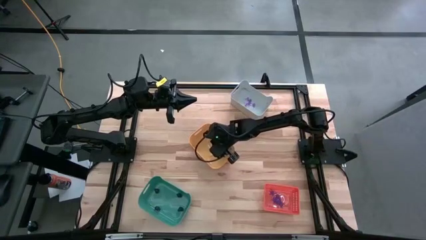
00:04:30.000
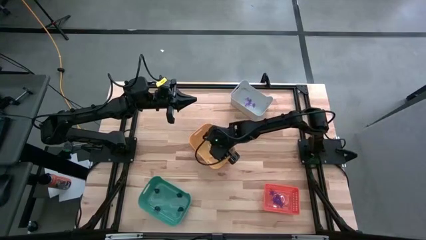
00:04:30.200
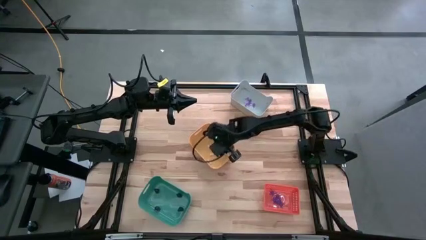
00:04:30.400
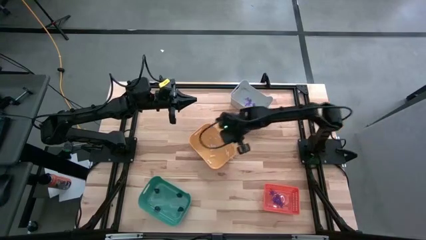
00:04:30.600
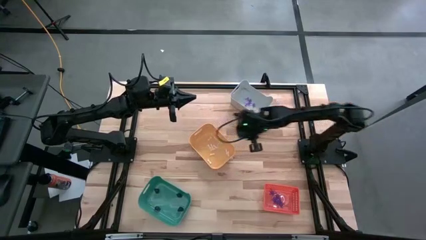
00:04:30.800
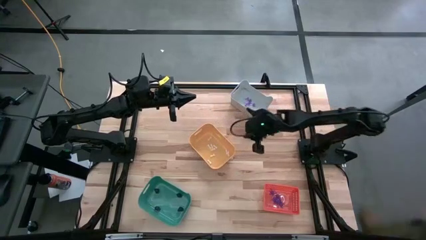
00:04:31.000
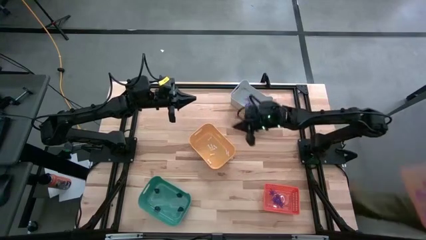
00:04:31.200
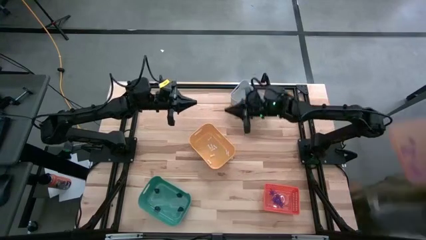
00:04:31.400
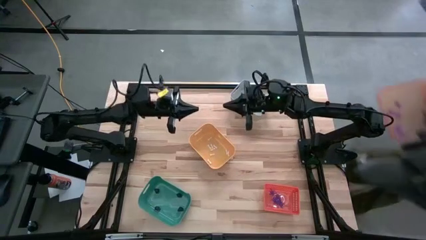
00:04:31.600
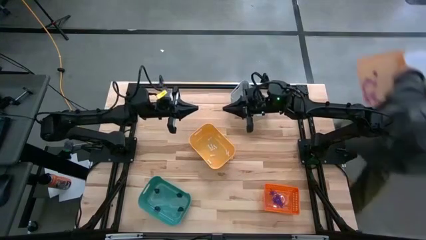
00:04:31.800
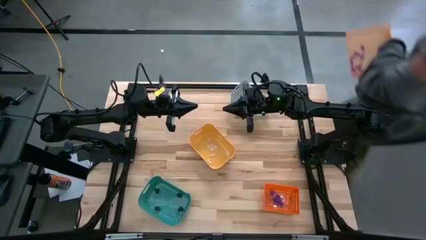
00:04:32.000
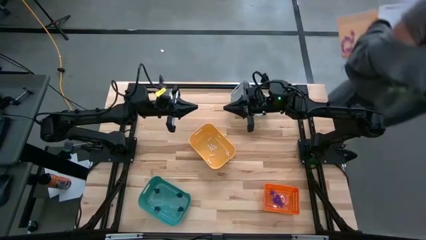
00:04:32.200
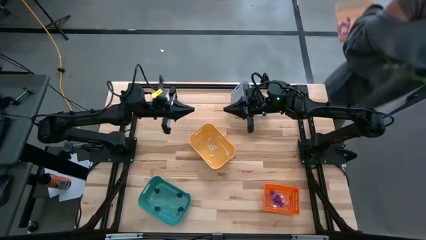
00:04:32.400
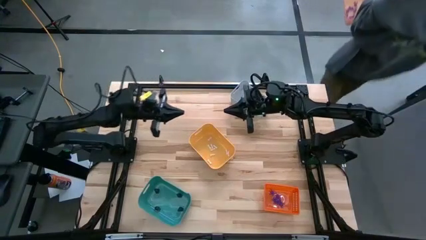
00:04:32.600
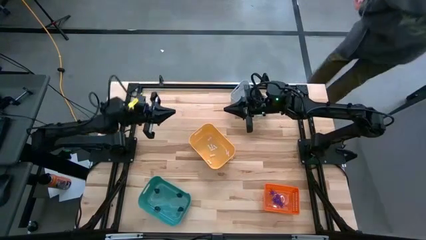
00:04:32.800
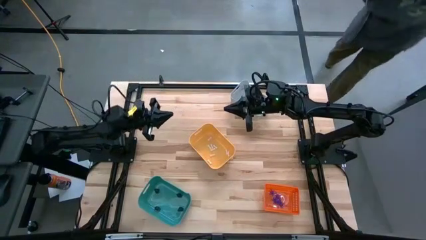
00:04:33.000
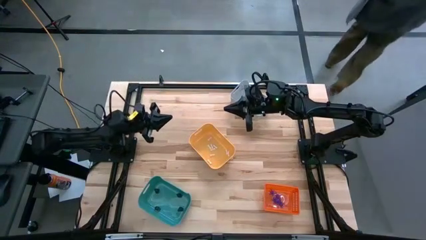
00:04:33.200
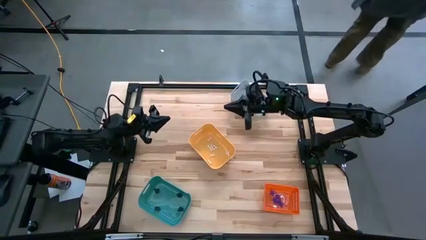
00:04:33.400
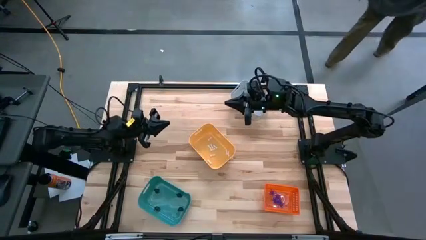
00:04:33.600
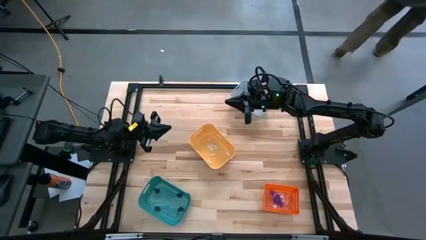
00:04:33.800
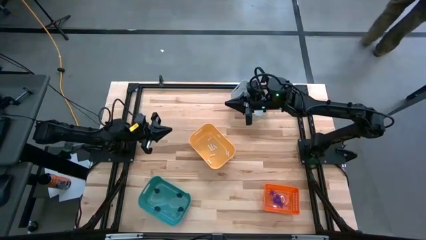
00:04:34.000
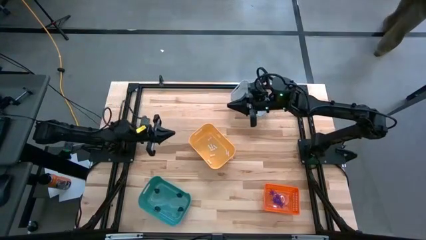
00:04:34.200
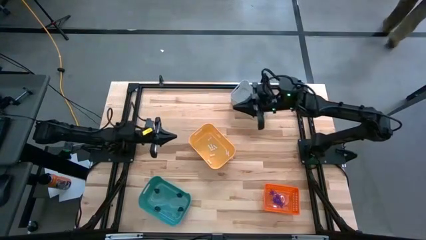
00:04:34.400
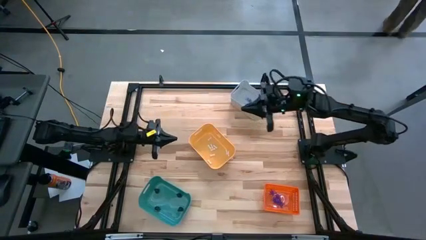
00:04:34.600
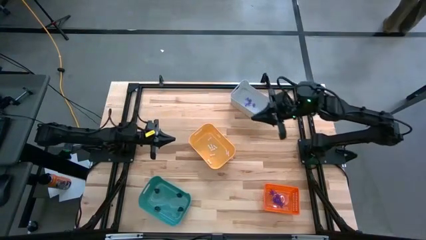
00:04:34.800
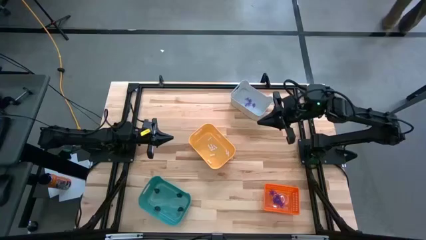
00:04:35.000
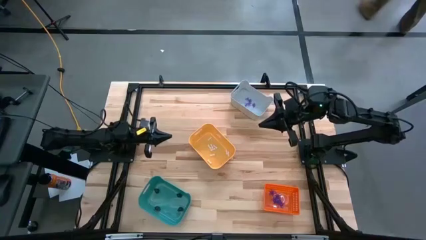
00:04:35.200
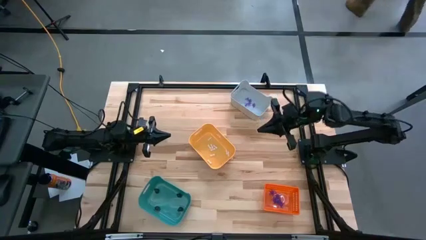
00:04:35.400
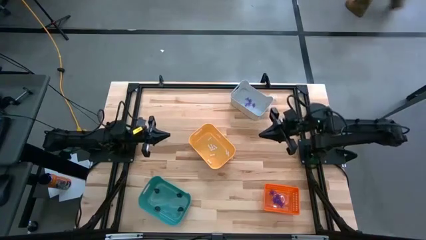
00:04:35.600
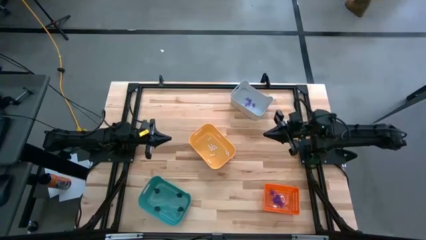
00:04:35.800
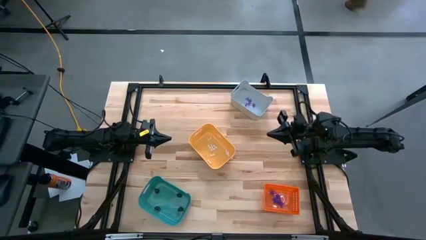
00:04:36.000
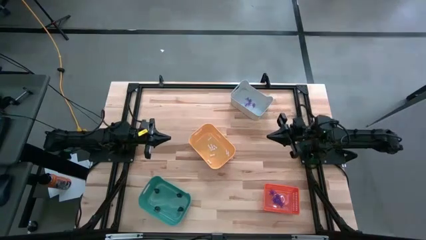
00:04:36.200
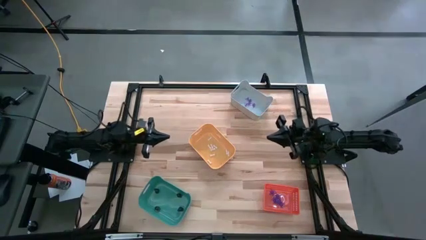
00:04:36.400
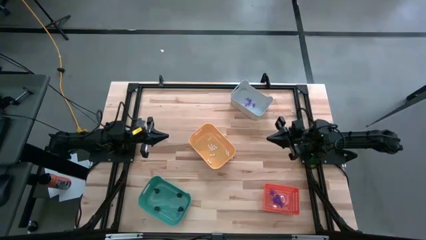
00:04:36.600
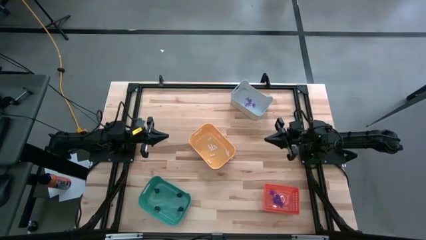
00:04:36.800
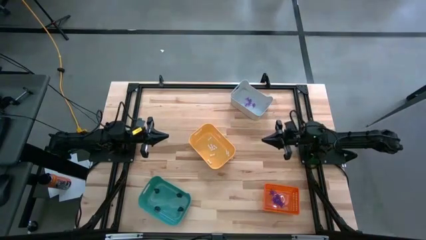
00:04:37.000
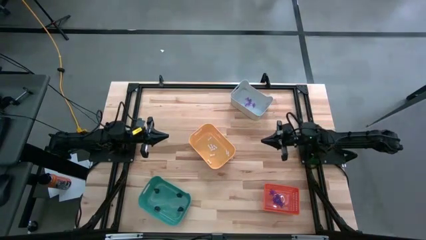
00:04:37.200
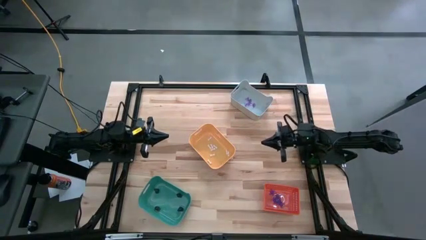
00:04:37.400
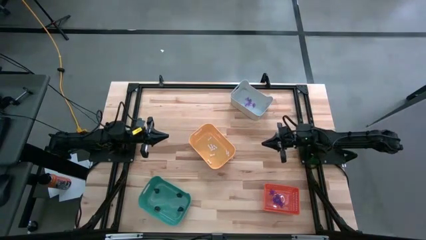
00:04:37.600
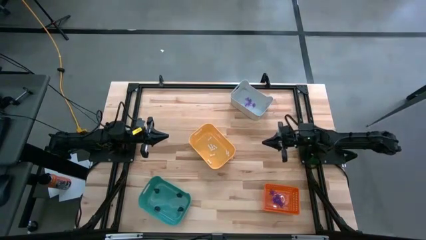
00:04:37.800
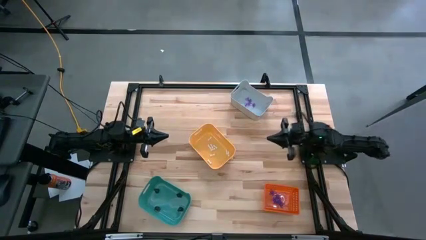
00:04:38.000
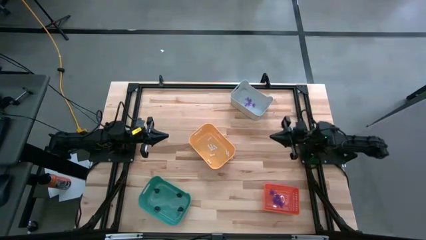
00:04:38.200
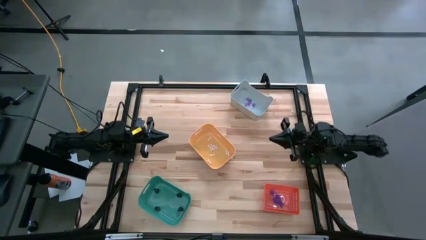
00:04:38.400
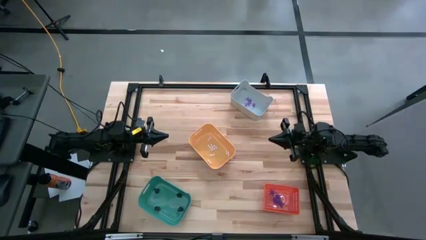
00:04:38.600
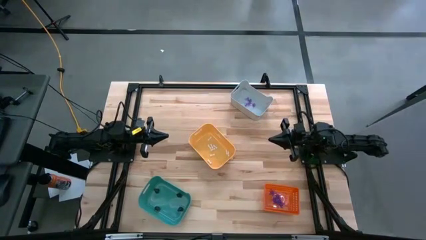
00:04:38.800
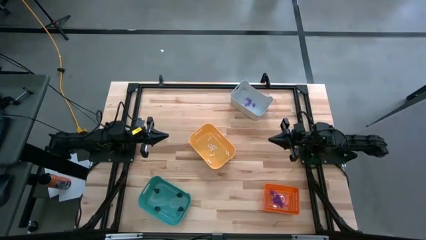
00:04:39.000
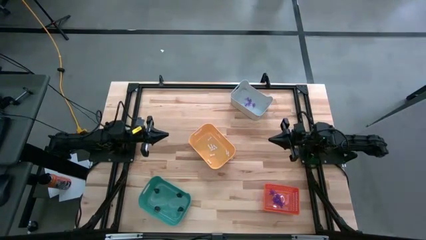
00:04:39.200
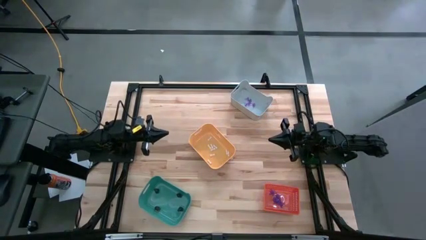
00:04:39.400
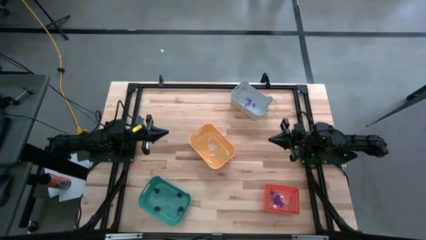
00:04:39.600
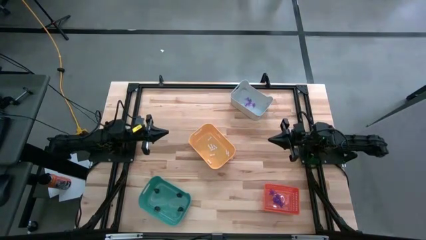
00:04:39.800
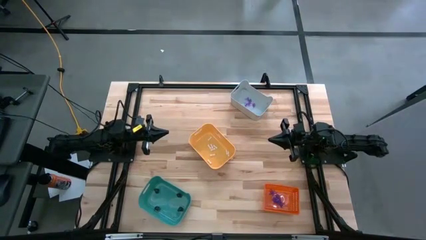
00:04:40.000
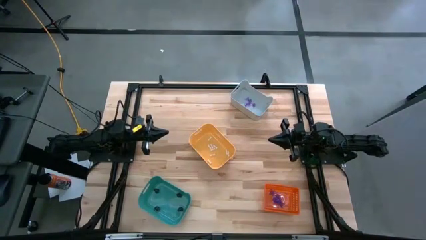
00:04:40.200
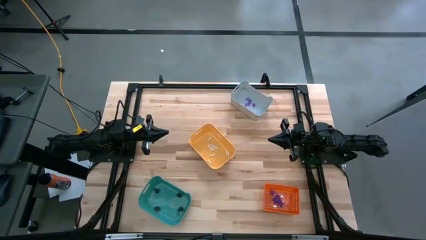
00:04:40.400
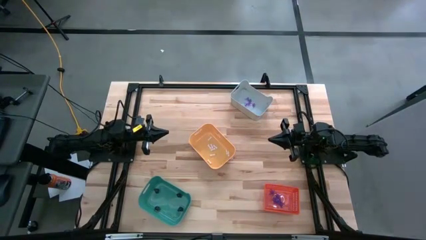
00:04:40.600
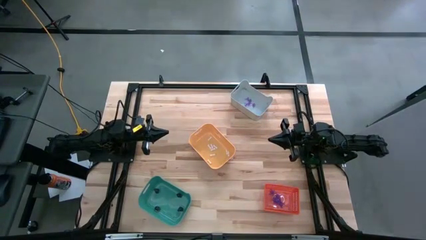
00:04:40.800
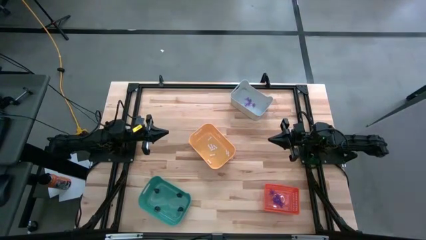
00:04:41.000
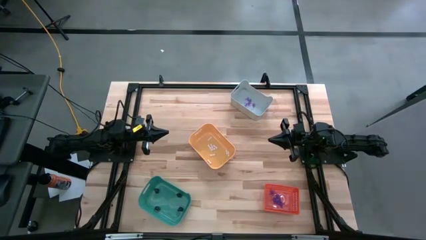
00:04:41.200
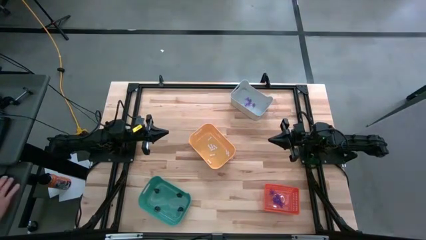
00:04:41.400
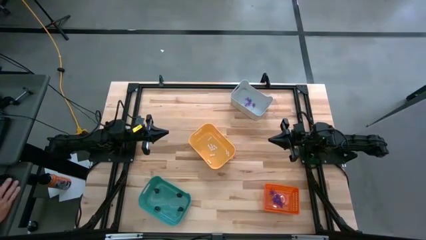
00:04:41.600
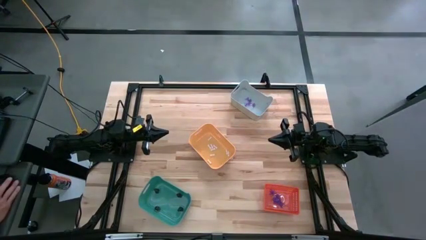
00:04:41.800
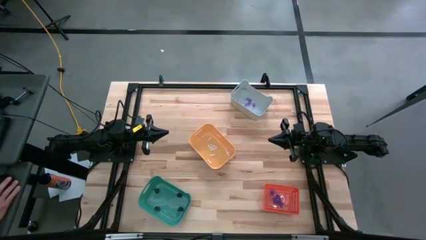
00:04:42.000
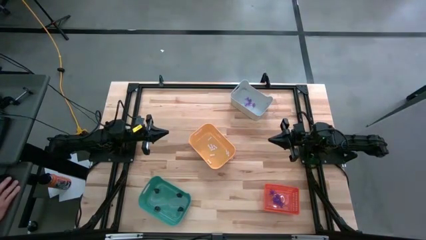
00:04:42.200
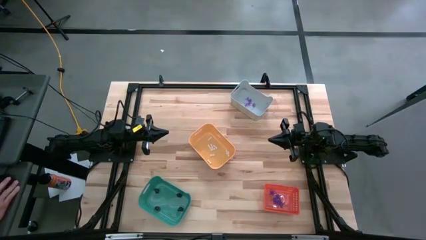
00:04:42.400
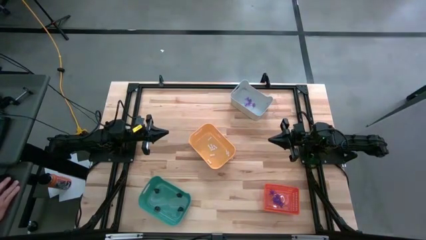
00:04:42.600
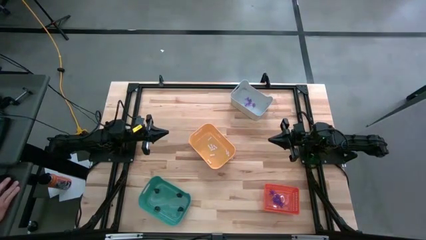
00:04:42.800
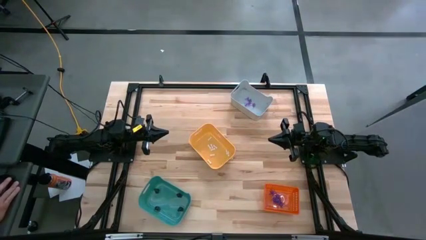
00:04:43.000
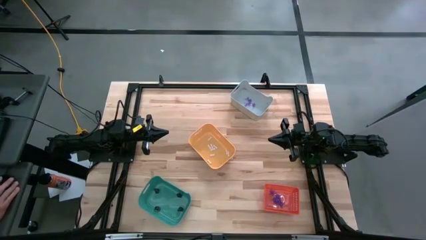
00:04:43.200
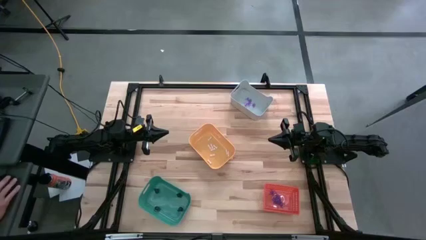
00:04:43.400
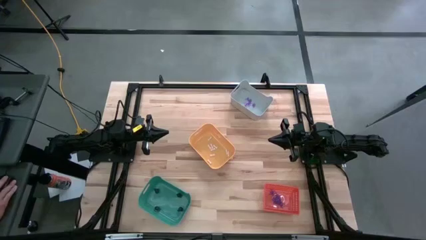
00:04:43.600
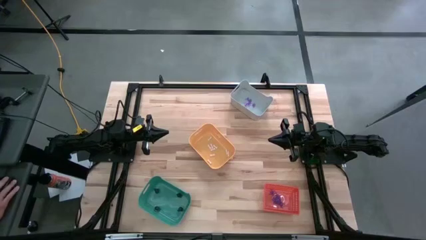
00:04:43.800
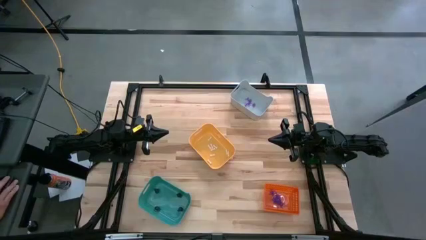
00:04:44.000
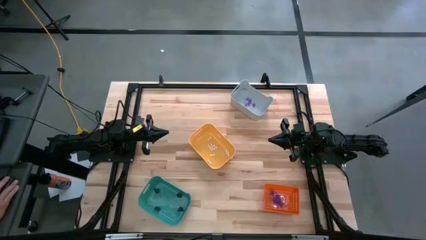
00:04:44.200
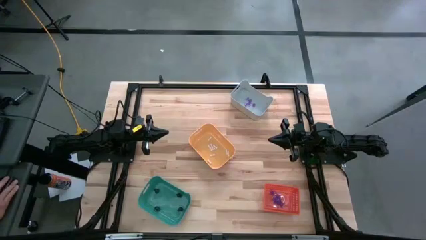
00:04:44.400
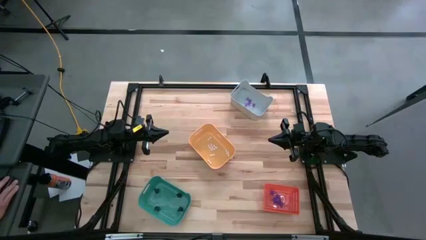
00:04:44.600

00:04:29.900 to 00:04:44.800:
Task: Sort Halloween decoration
Return to Home Position

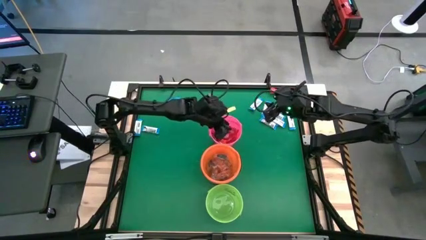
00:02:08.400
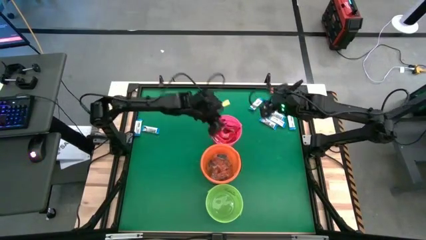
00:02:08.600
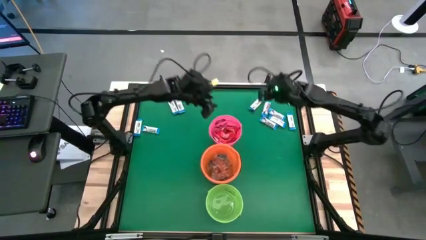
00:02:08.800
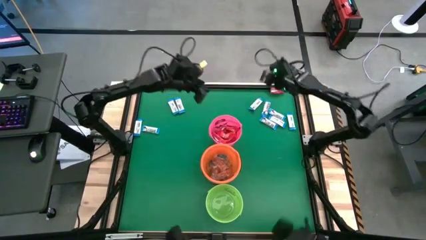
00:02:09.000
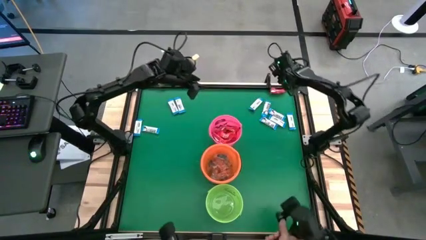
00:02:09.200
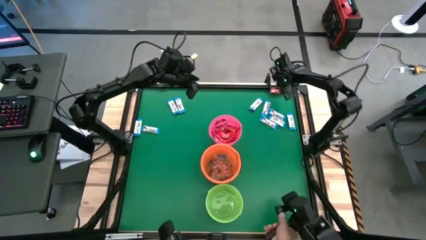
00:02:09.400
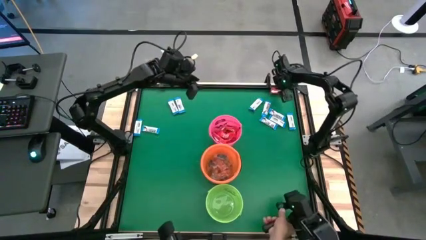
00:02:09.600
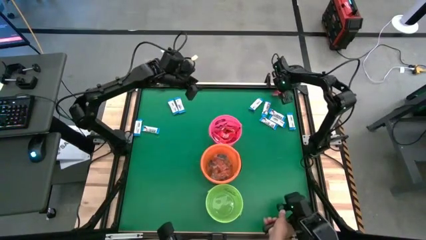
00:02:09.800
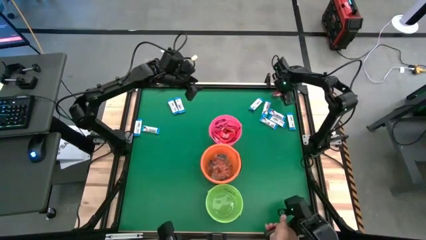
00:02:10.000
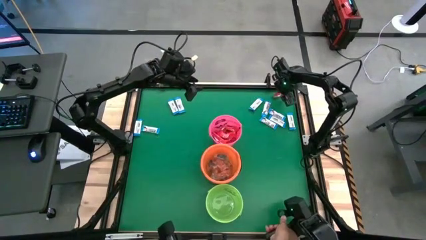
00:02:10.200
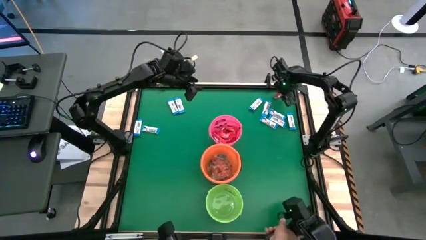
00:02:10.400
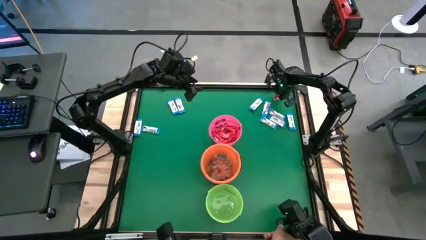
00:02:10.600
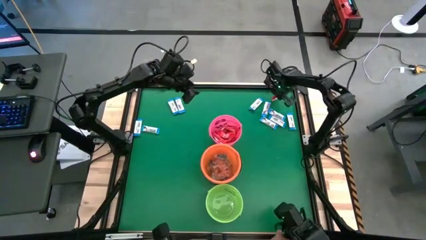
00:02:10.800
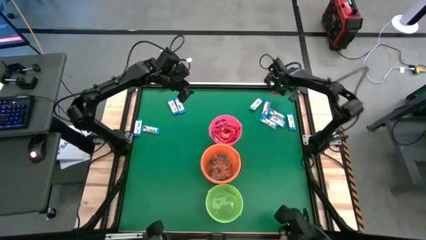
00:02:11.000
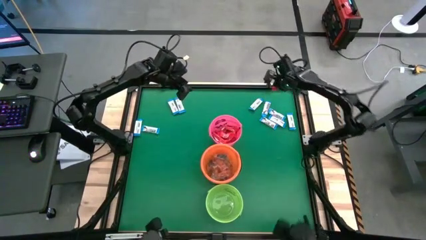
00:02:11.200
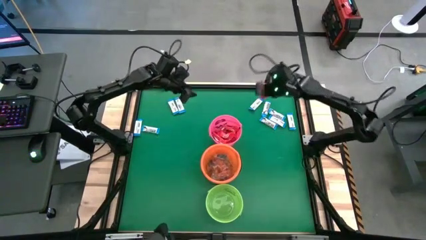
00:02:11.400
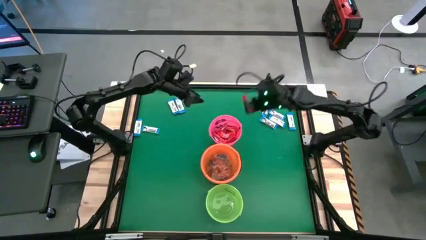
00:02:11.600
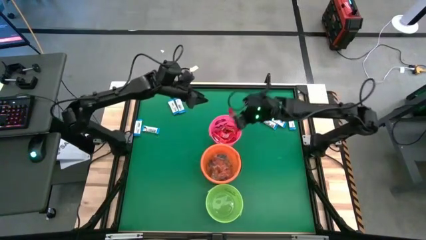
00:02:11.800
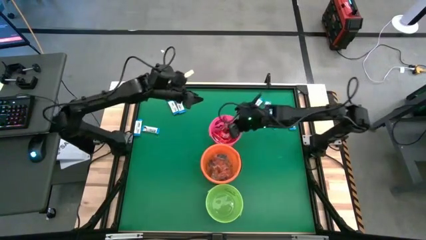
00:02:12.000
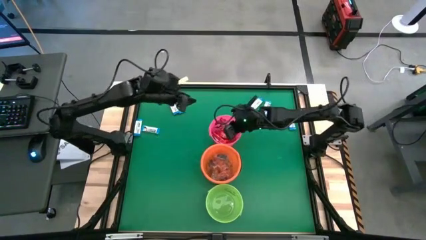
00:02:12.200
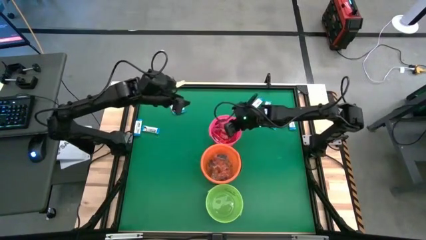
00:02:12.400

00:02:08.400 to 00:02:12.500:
Task: Sort candy by brand, put in halloween buckets
Put the red chocolate into the pink bucket
